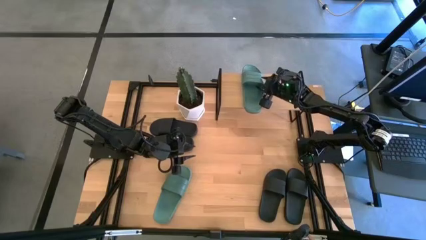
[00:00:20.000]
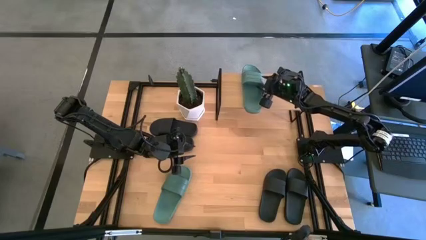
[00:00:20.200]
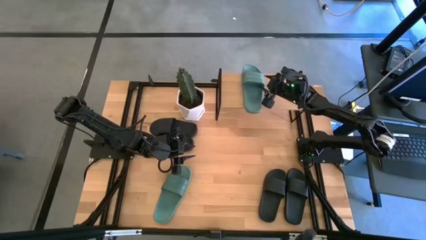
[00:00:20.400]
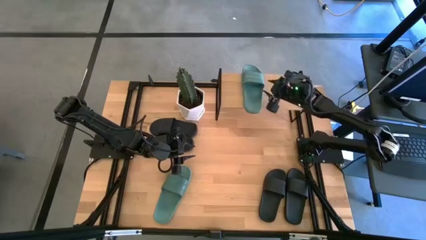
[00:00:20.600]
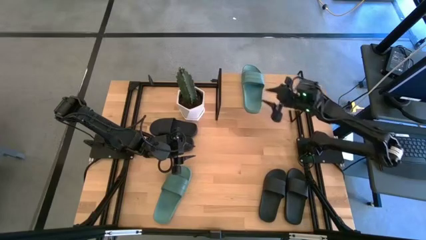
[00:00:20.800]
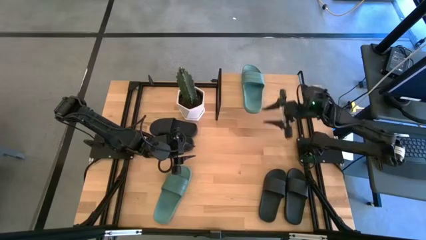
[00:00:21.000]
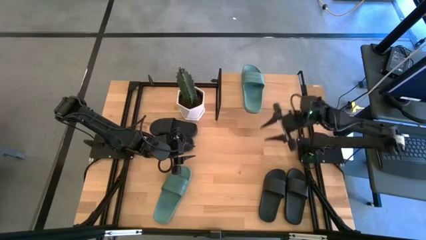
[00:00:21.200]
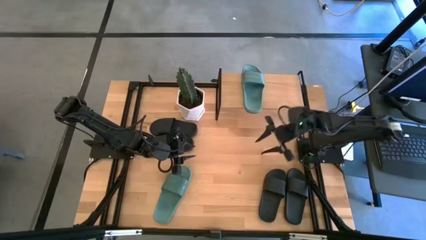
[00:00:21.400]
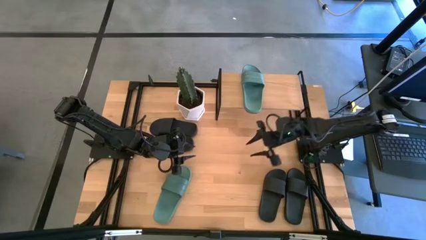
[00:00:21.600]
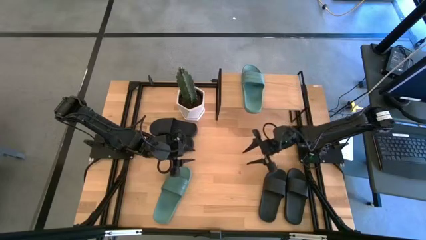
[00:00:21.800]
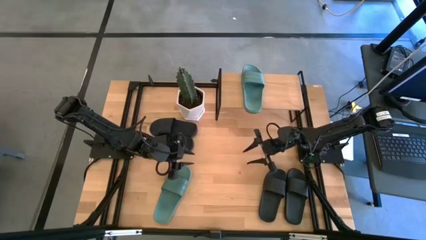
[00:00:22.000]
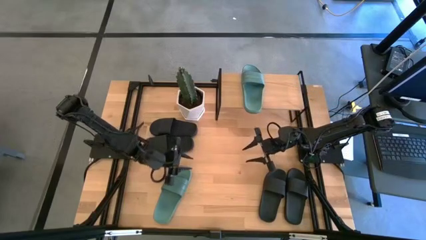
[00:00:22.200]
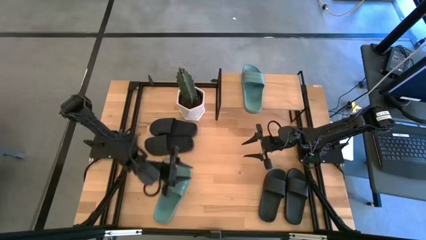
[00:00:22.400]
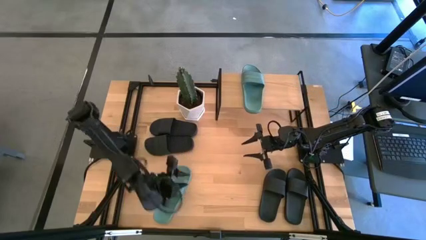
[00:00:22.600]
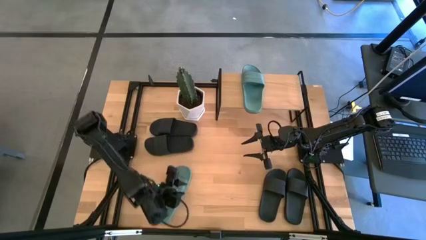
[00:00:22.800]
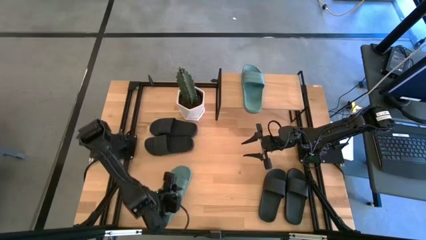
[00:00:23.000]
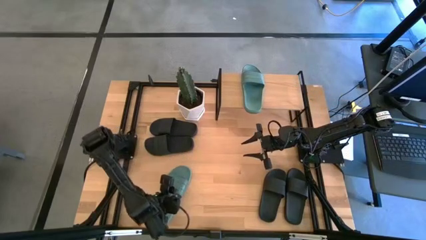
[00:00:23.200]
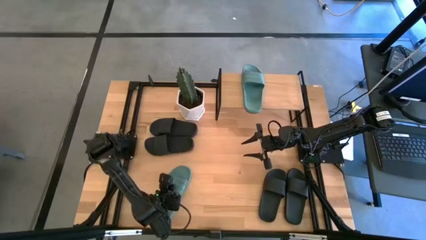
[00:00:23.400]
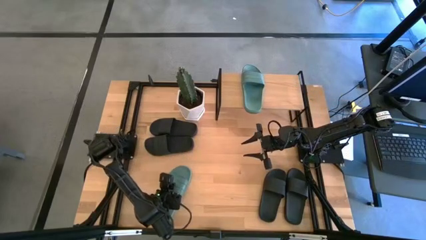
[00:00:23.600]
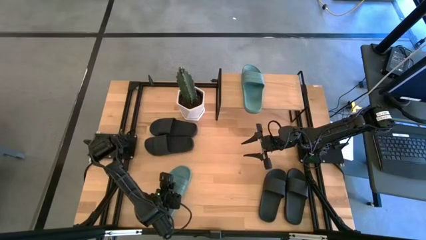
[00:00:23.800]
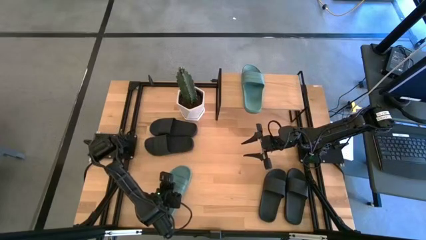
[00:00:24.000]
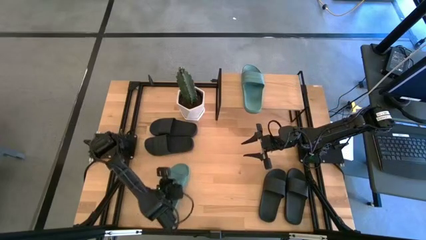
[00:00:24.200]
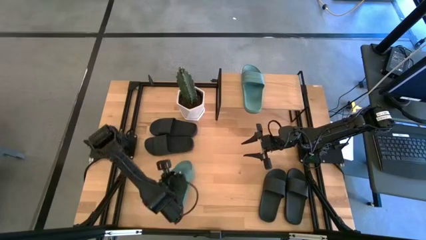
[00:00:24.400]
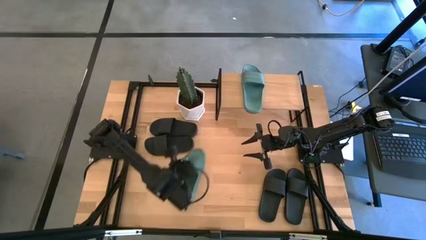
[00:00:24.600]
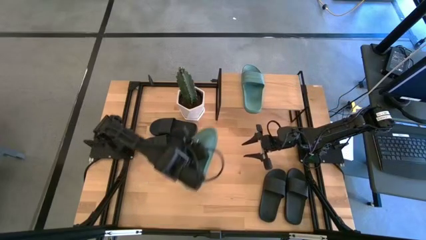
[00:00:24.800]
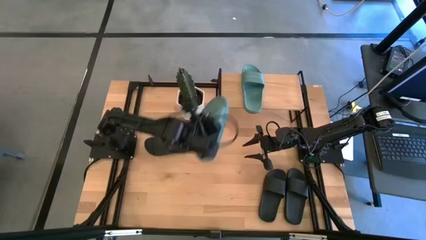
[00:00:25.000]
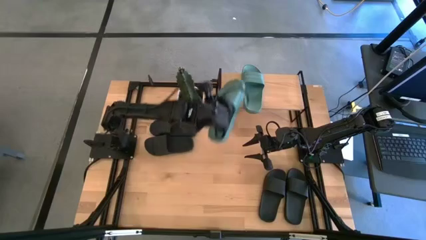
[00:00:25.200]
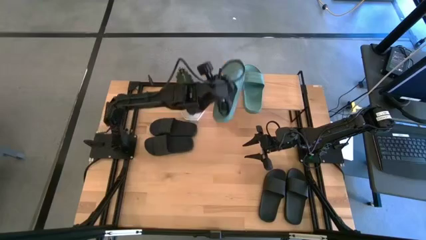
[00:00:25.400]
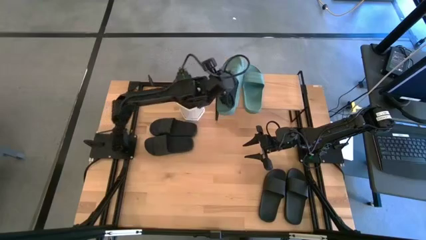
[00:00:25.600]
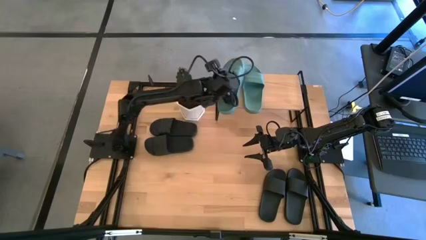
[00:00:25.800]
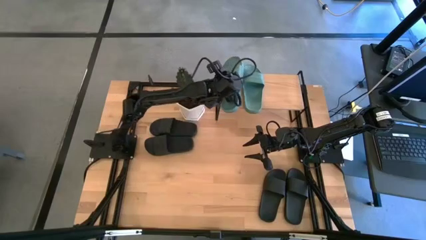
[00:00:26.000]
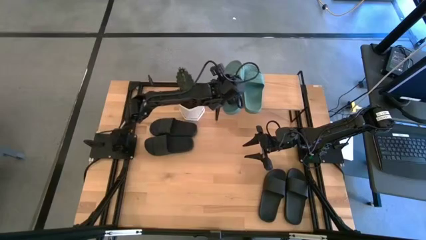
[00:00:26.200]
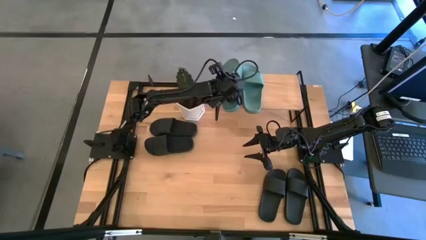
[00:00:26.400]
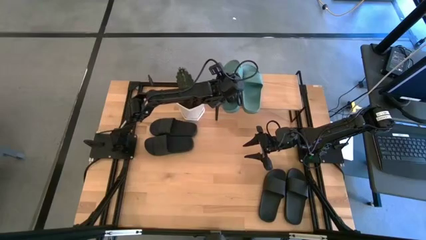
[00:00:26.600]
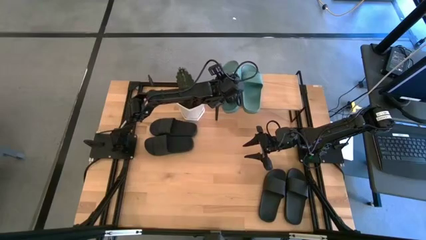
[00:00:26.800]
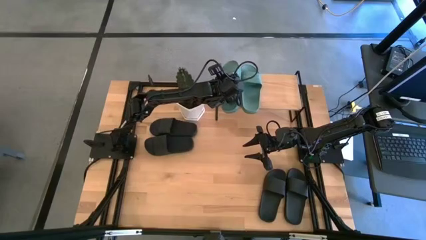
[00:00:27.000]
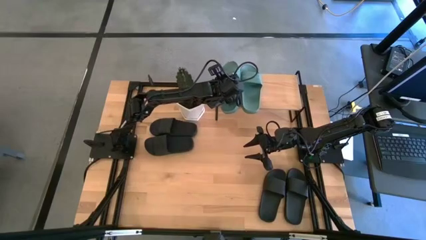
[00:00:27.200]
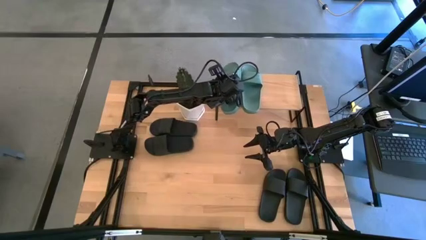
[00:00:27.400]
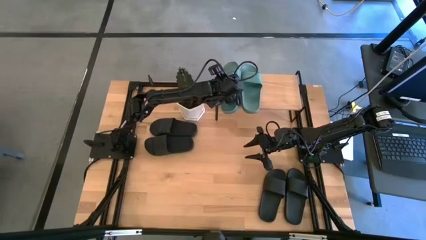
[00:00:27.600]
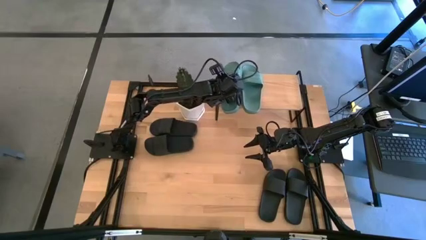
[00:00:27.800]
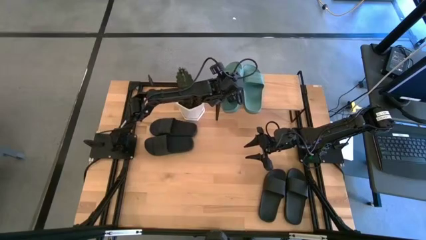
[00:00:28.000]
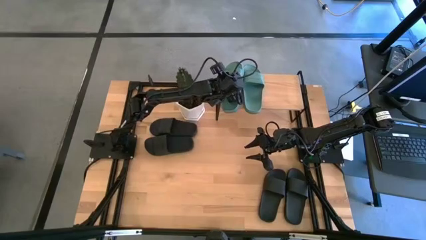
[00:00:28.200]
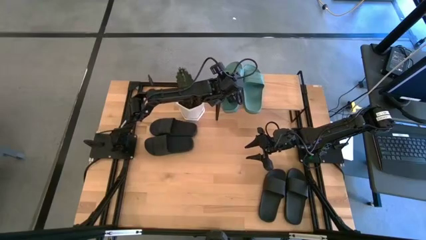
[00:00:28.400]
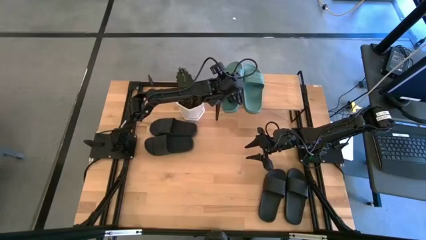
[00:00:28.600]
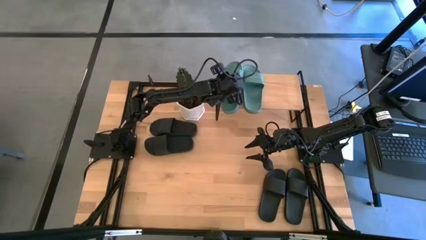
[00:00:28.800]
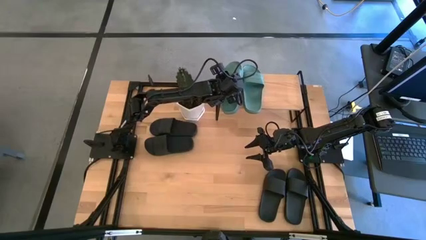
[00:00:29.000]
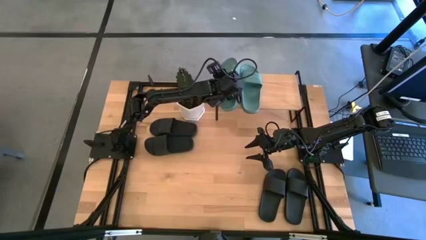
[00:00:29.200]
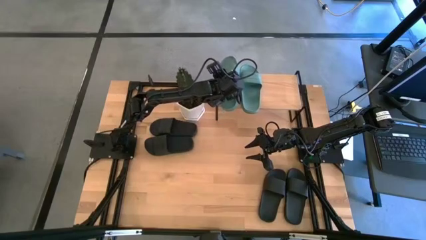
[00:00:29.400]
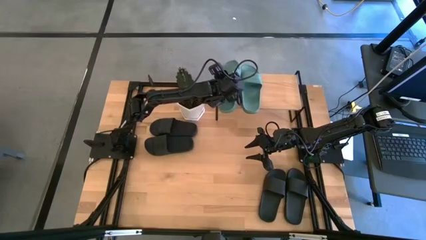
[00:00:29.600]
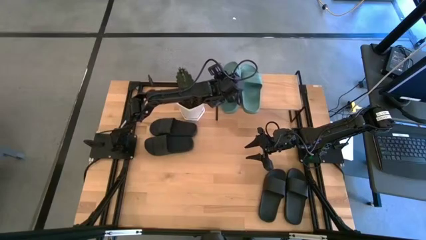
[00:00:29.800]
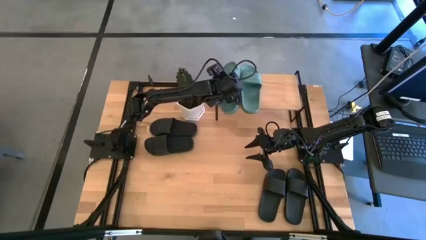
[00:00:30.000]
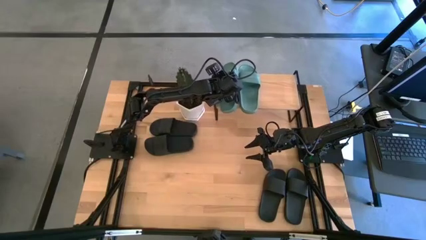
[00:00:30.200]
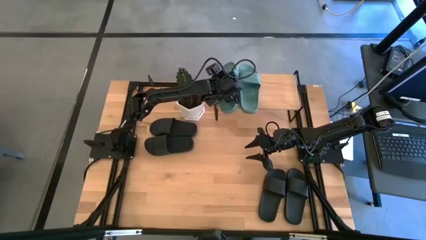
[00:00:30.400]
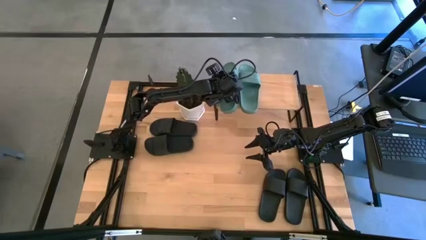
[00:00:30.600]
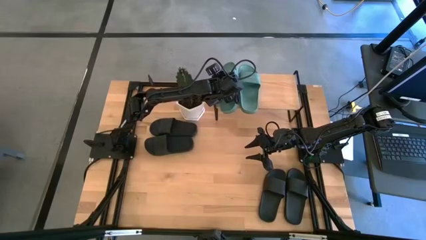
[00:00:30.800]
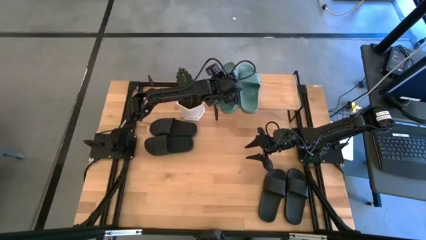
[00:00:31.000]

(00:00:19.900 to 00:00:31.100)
Task: Pick and place slides into the shelf
Put the green slipper on the shelf
